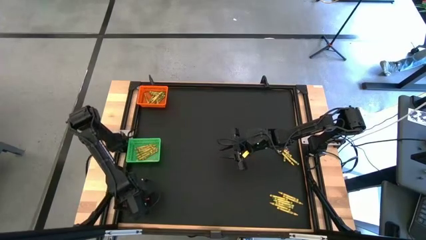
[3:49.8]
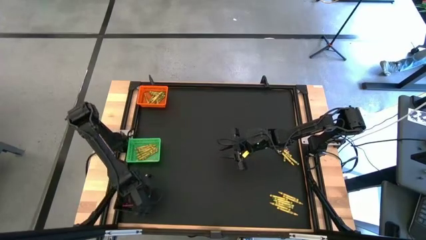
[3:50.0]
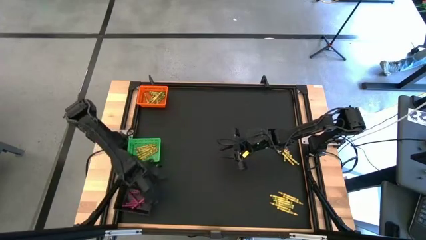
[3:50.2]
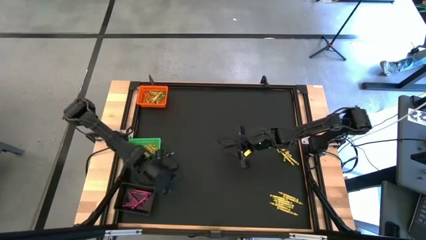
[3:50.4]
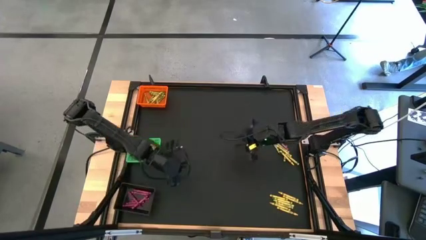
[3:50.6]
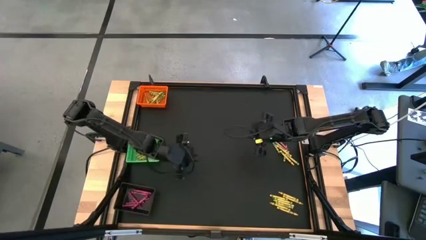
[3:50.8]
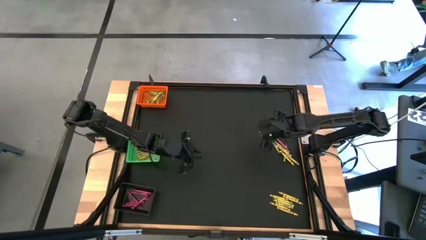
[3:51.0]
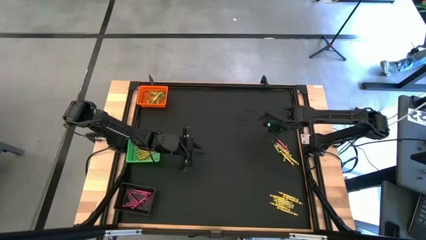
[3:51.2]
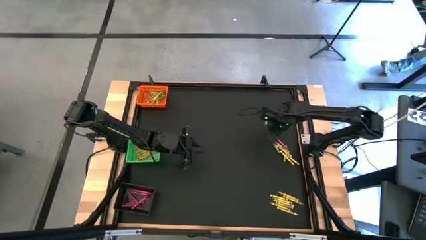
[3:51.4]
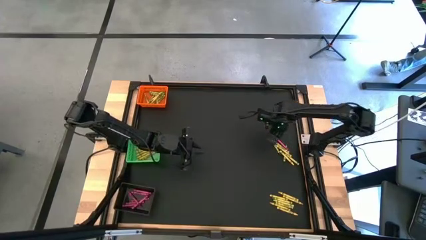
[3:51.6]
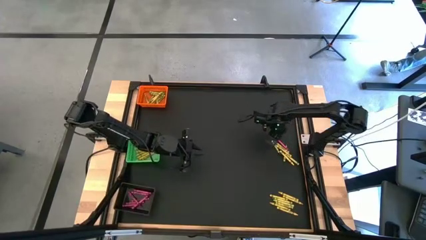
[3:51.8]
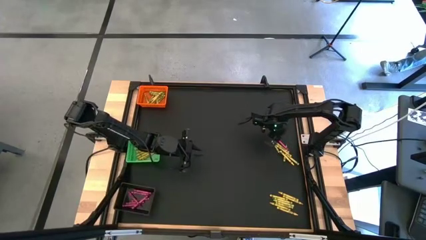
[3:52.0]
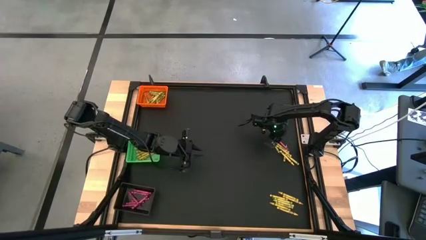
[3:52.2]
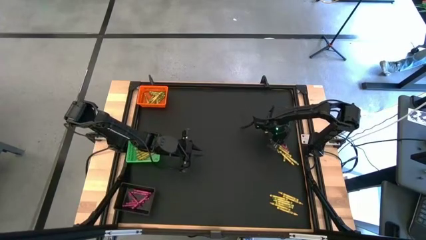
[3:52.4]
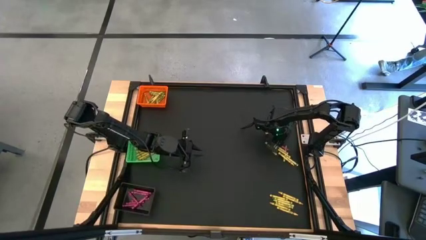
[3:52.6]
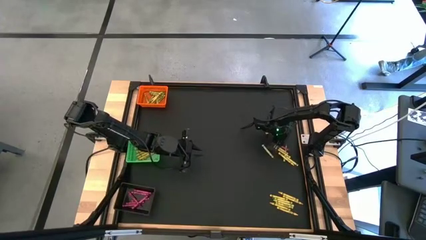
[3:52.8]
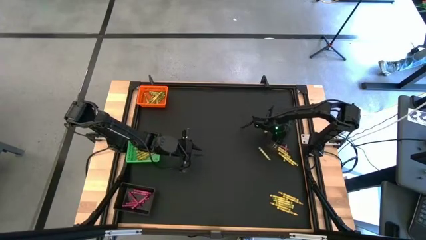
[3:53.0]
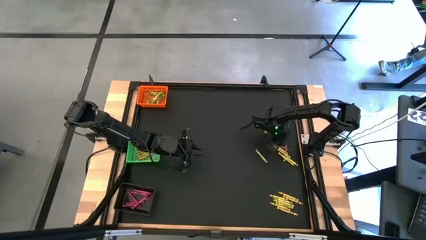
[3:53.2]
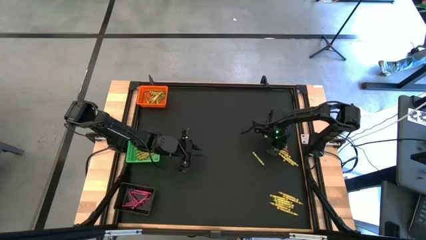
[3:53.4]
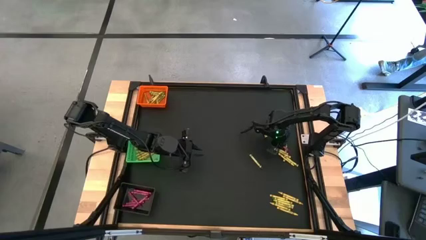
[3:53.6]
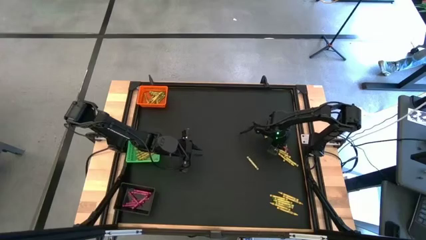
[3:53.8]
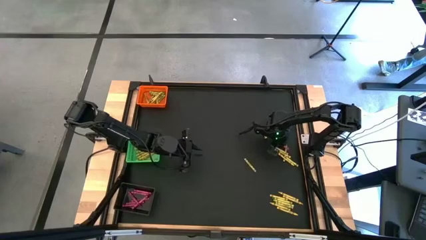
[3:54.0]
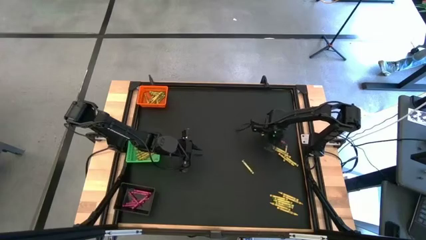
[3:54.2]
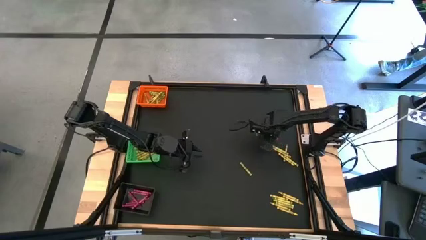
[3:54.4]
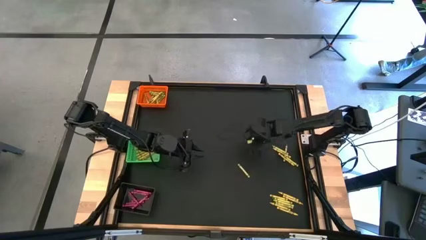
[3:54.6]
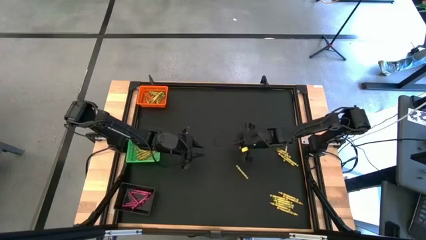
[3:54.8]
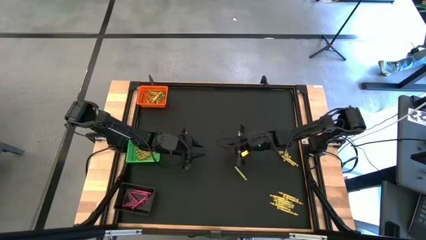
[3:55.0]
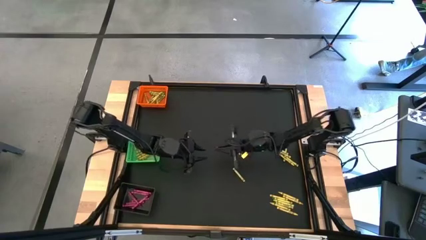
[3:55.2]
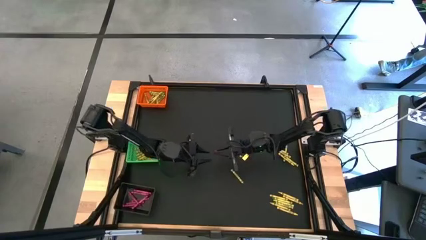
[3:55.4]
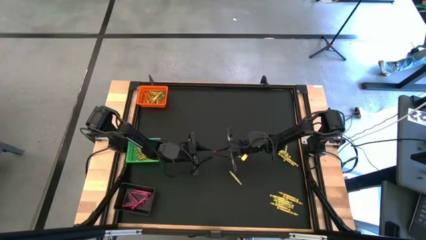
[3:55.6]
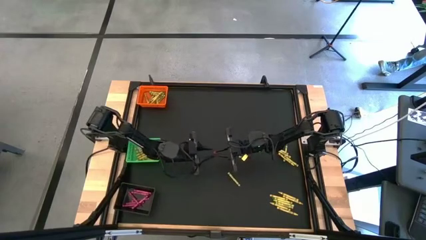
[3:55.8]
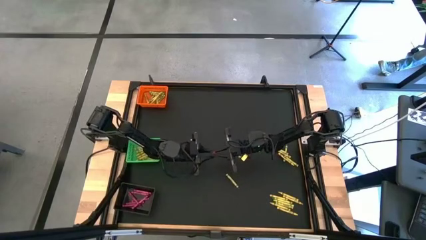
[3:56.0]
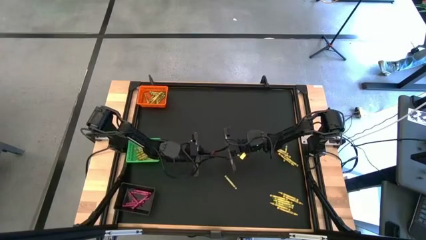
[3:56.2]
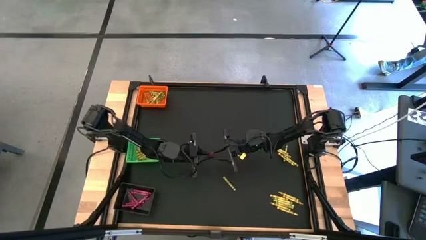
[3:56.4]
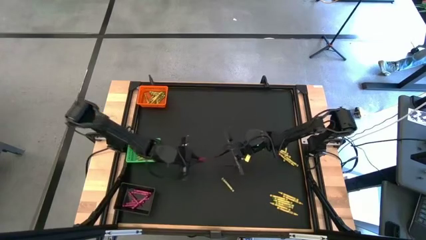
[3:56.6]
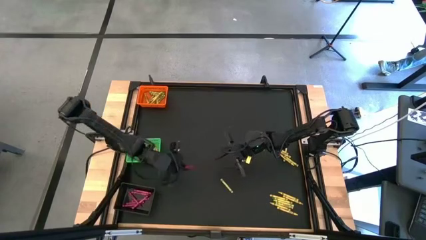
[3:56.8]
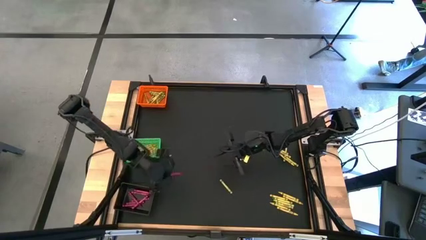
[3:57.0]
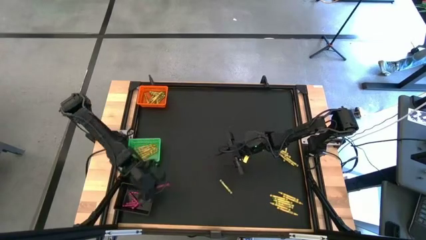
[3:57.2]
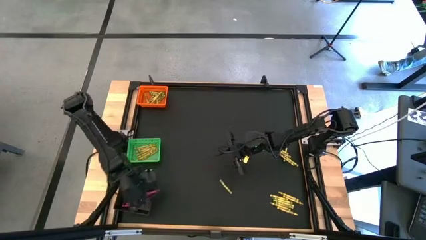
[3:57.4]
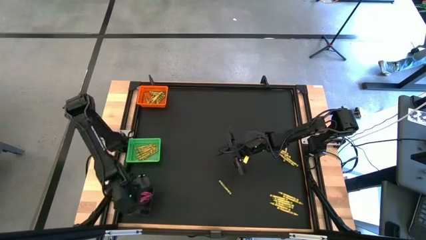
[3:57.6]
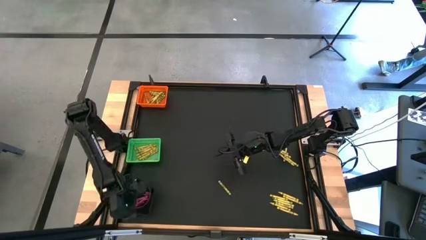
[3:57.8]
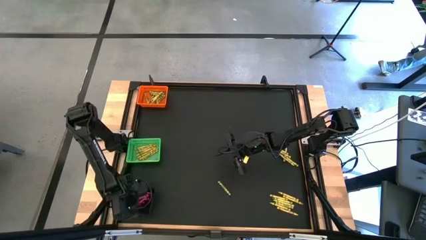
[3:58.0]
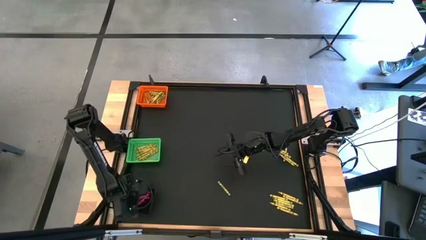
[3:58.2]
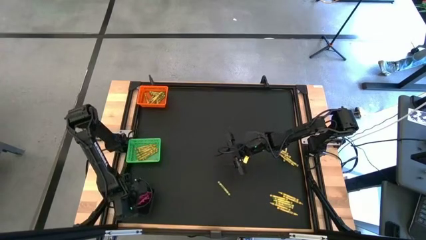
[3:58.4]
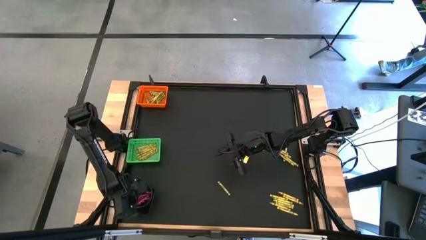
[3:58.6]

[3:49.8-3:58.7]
Task: Sort crayons
Put the pink crayon into the black bin

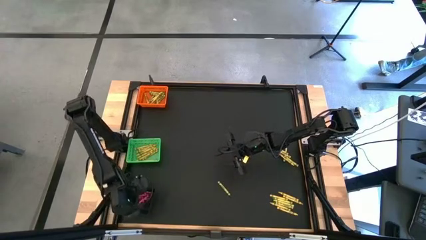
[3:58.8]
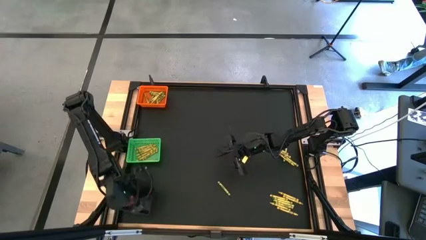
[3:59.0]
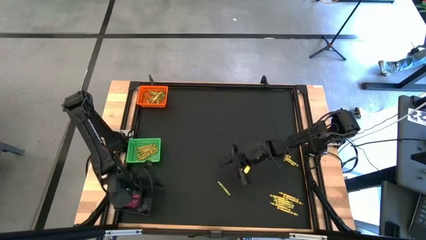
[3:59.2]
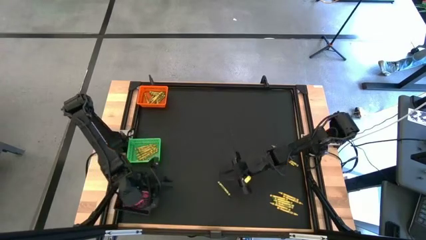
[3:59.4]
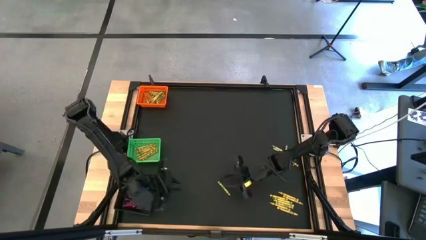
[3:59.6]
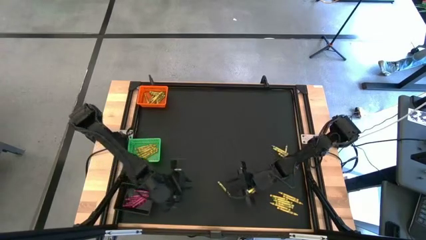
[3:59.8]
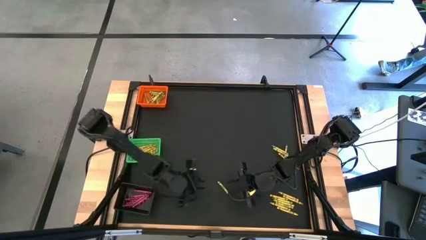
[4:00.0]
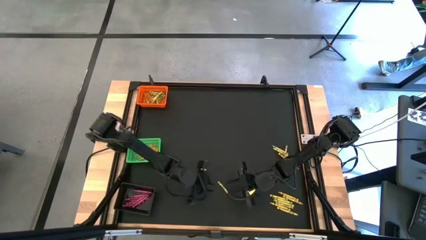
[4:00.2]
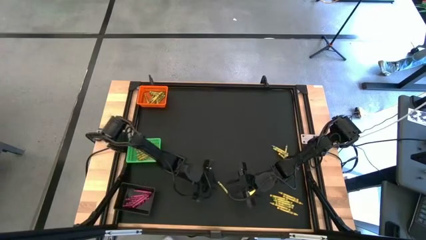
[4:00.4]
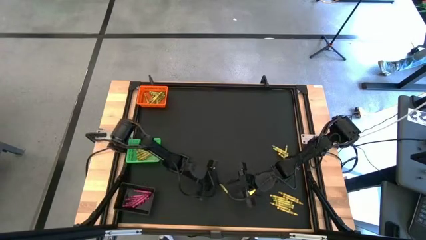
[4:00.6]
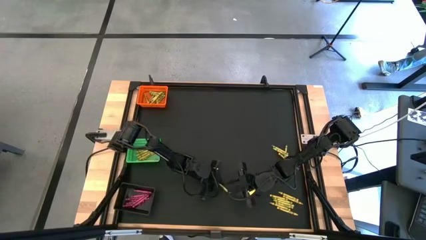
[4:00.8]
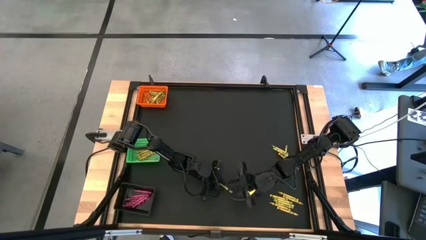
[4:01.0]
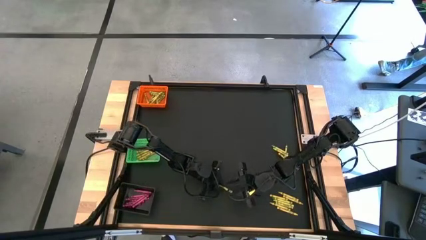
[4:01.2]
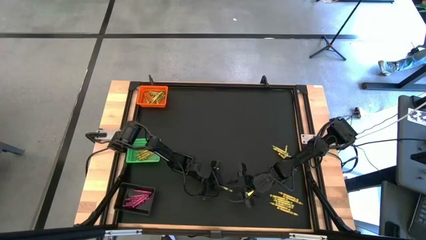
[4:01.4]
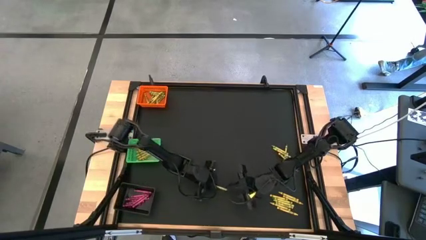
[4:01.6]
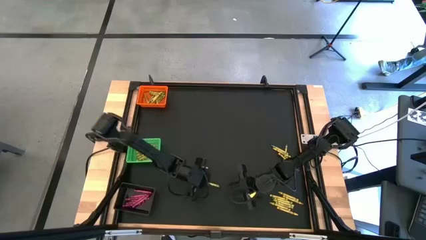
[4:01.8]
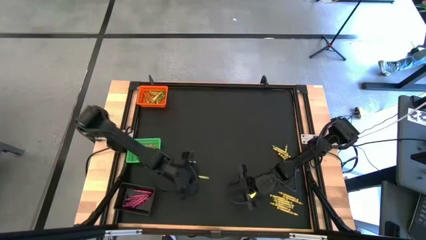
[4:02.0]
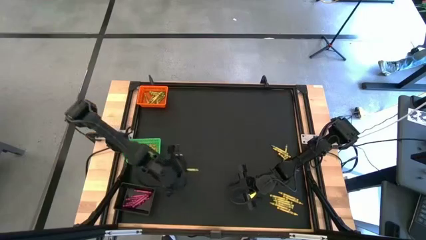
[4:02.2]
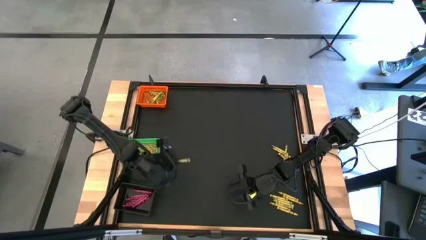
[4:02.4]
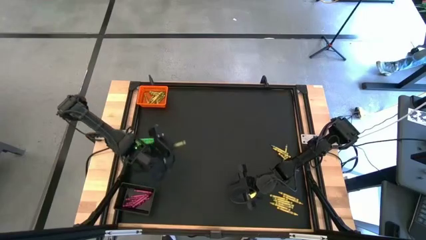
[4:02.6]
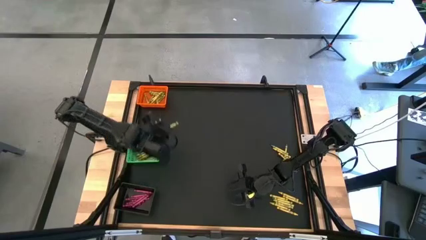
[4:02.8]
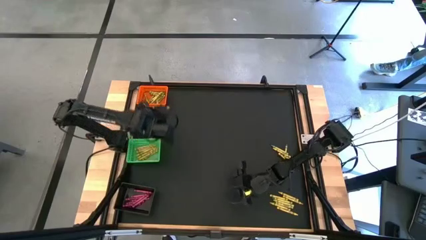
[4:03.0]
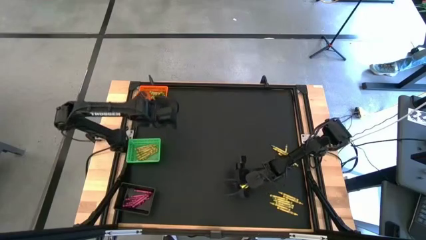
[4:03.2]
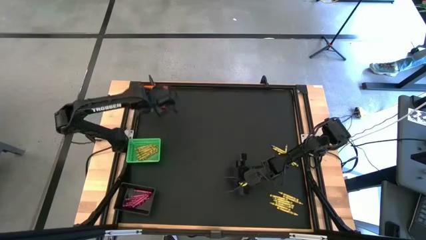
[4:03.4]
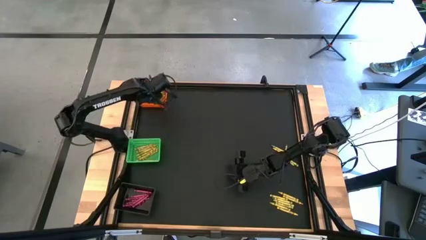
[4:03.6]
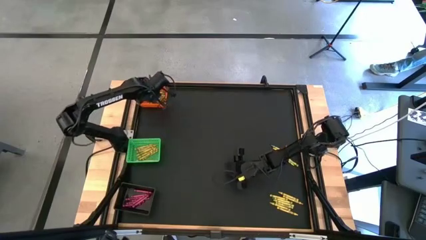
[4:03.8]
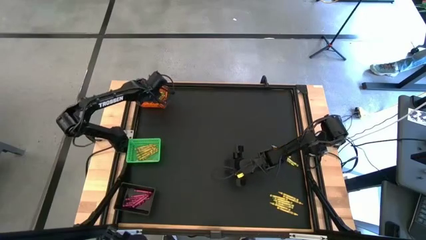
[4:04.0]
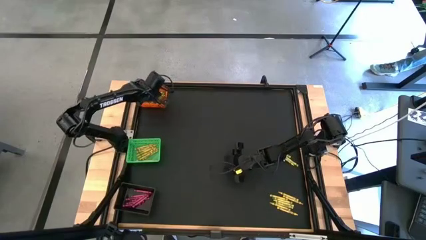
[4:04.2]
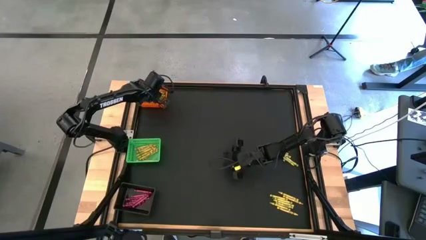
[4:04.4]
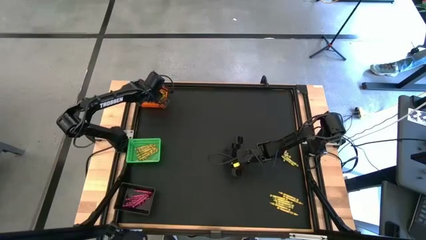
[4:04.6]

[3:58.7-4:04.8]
Put the green crayon into the orange bin

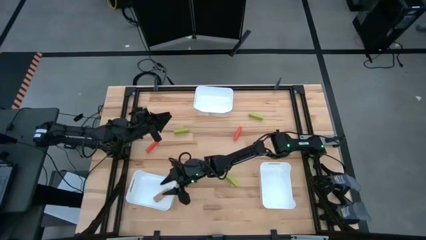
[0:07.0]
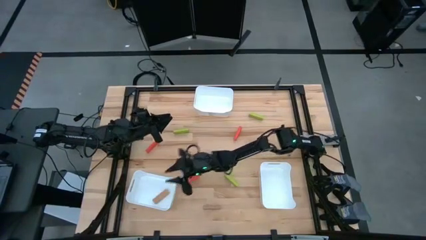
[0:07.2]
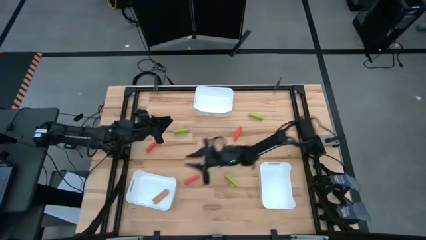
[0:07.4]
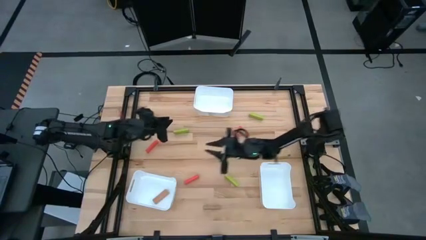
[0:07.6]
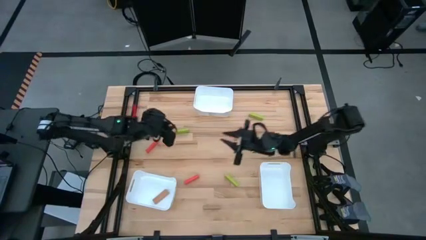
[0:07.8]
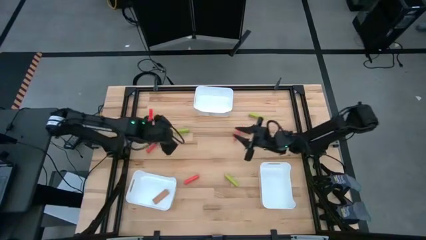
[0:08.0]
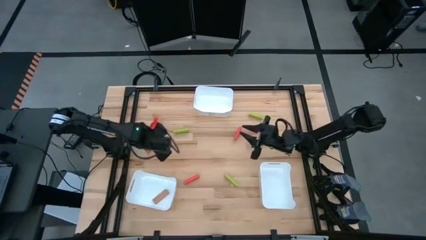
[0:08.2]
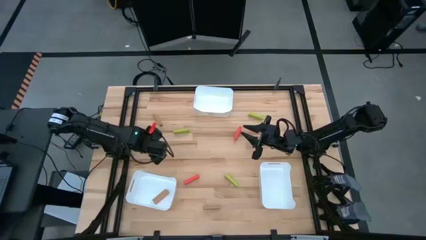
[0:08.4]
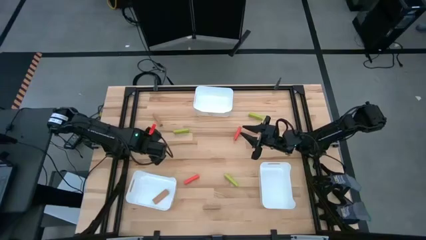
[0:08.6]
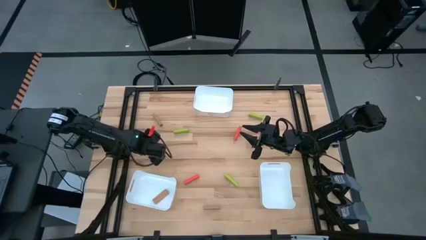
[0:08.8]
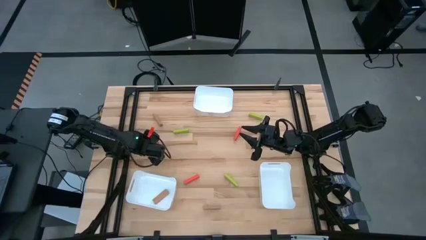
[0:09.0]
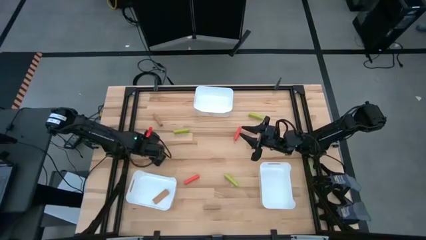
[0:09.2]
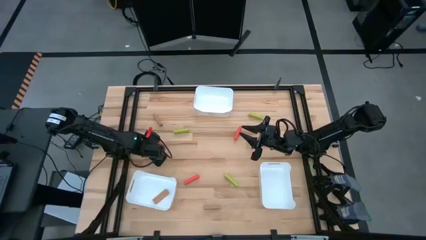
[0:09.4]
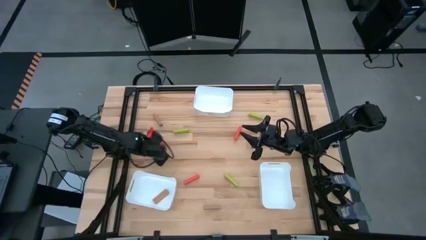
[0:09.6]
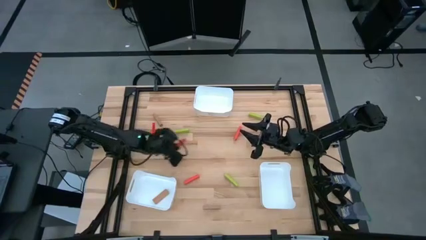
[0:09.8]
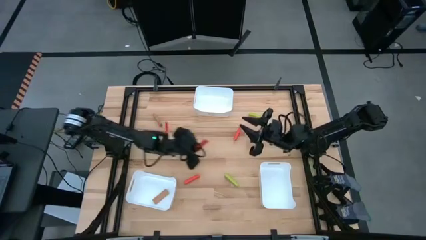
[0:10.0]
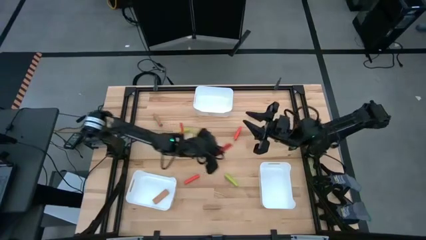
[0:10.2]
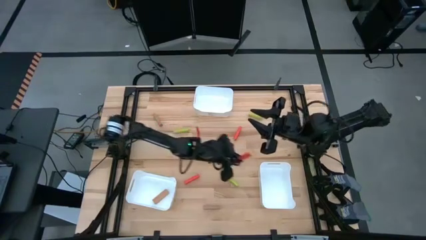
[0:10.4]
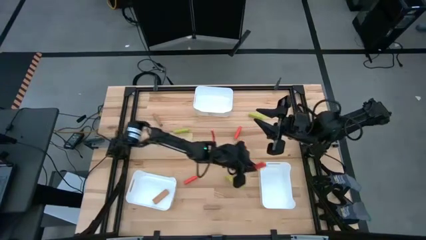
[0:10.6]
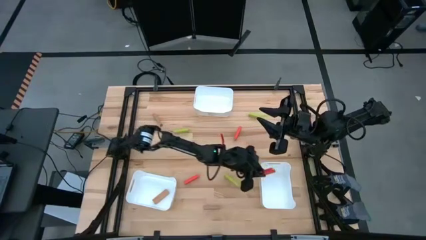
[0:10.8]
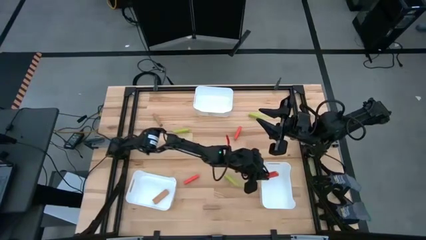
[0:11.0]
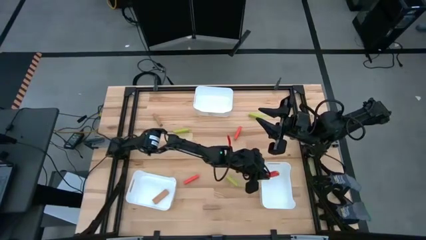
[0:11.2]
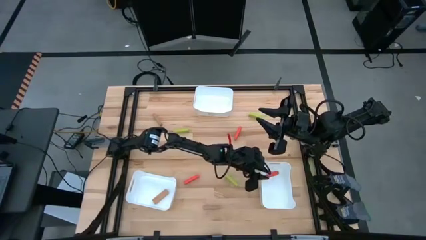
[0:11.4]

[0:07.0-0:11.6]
Task: Sort blocks
Put the top left orange block into the bottom right white bin
